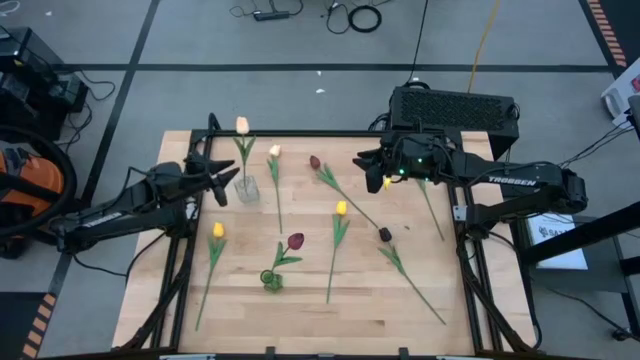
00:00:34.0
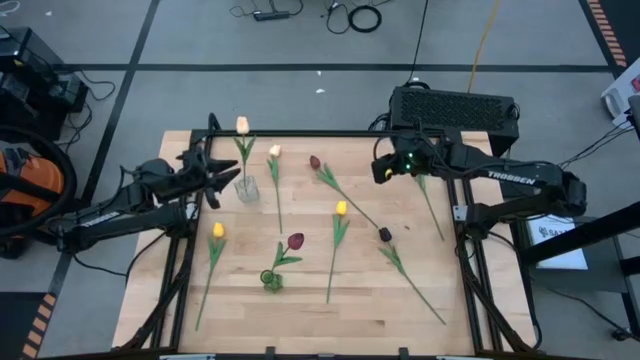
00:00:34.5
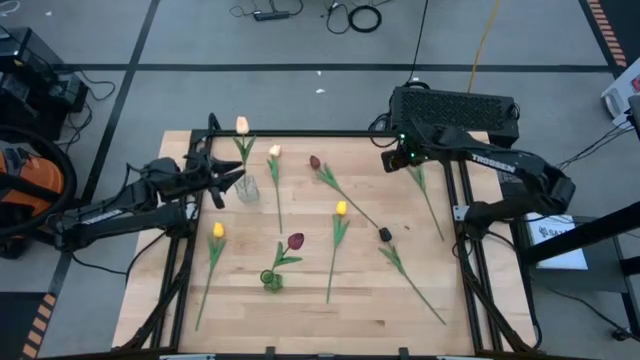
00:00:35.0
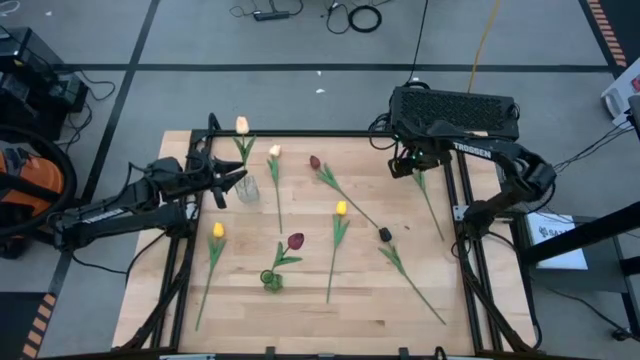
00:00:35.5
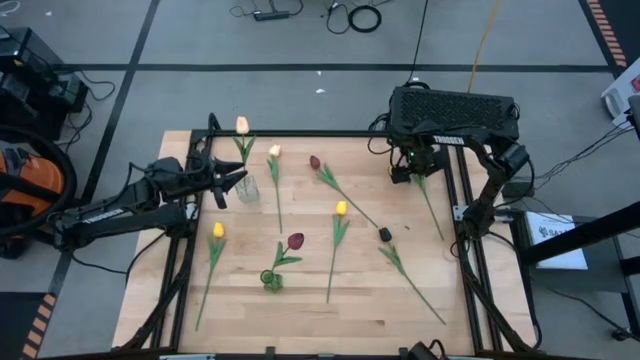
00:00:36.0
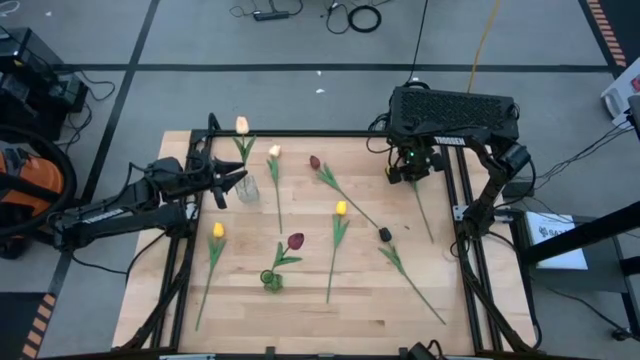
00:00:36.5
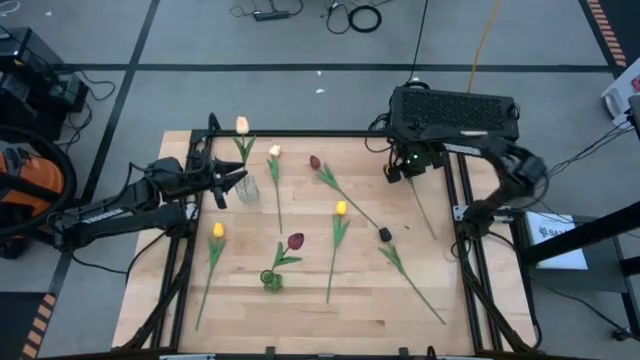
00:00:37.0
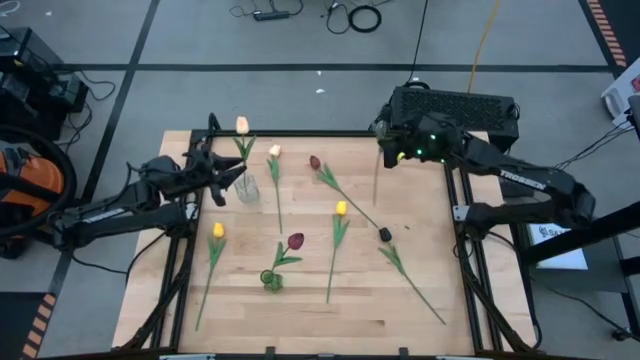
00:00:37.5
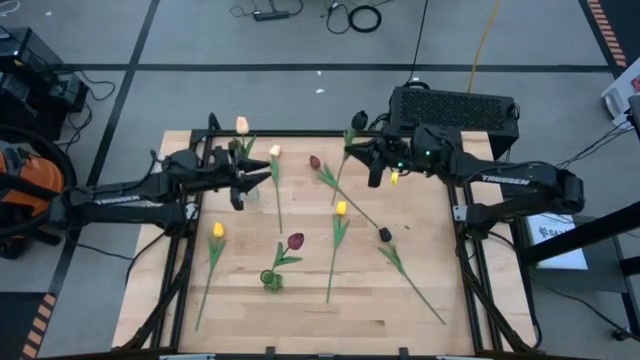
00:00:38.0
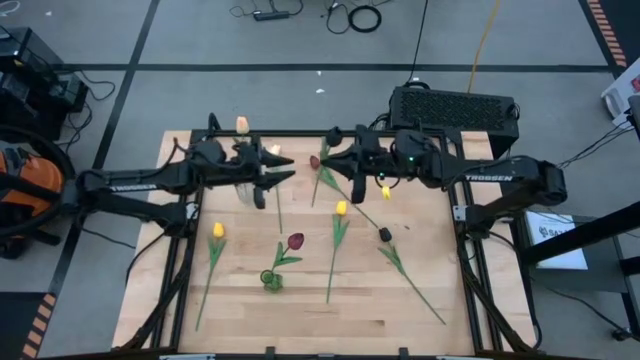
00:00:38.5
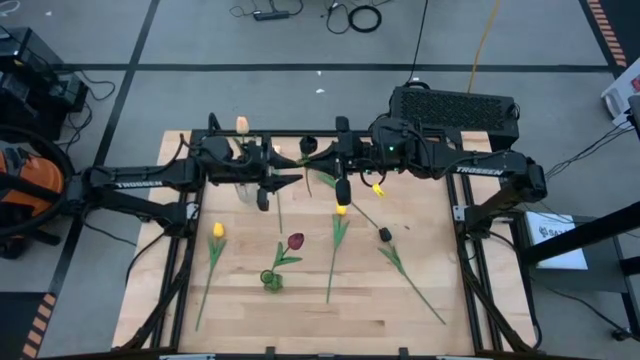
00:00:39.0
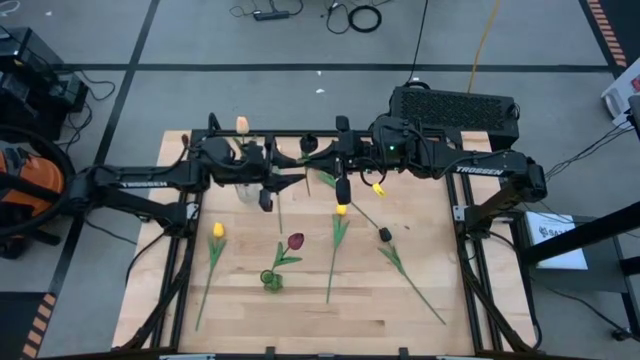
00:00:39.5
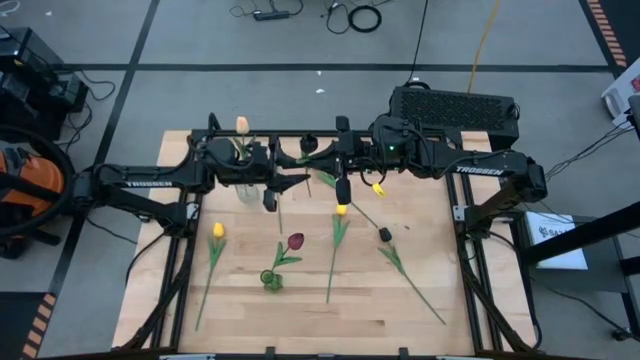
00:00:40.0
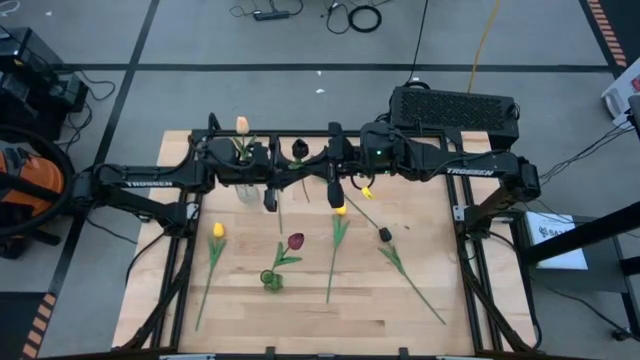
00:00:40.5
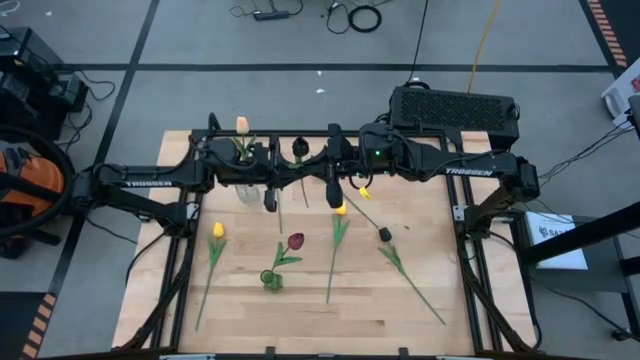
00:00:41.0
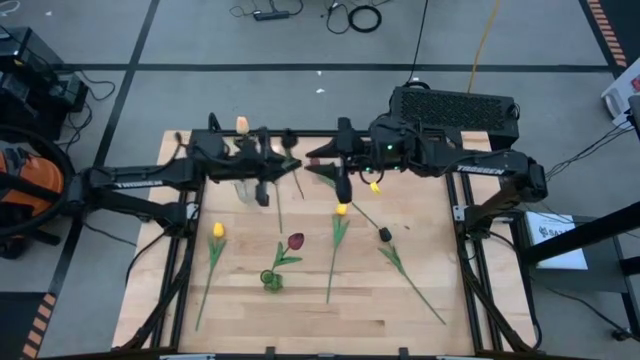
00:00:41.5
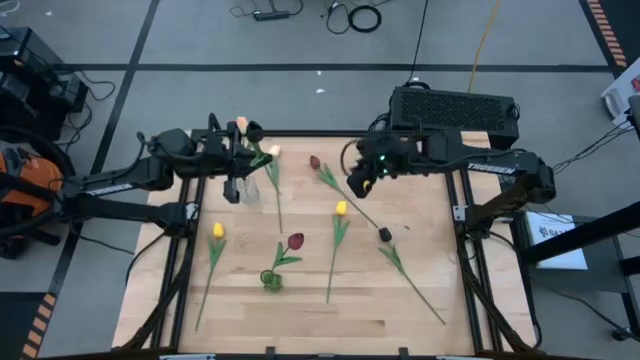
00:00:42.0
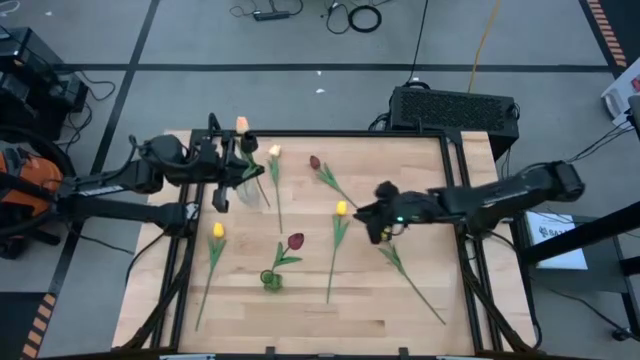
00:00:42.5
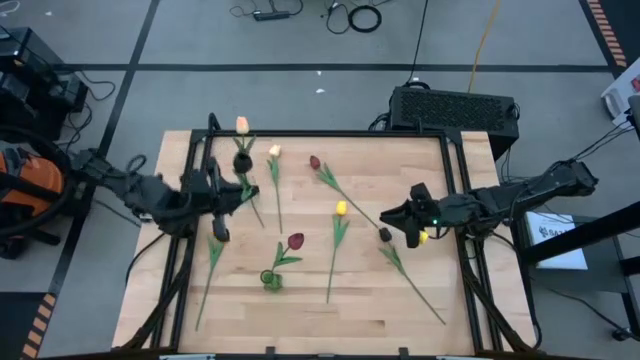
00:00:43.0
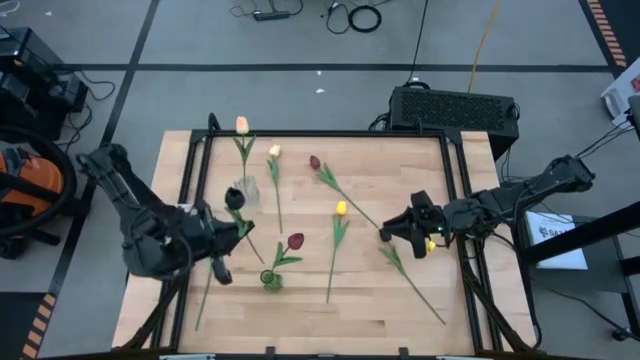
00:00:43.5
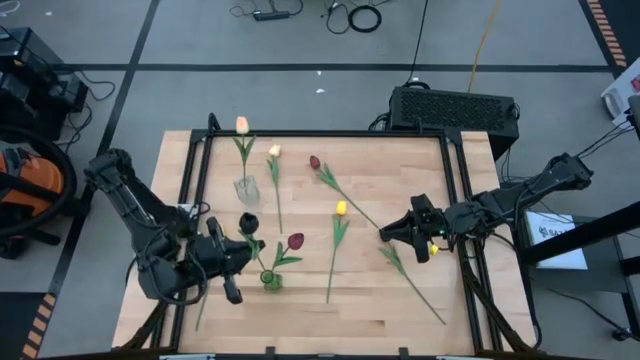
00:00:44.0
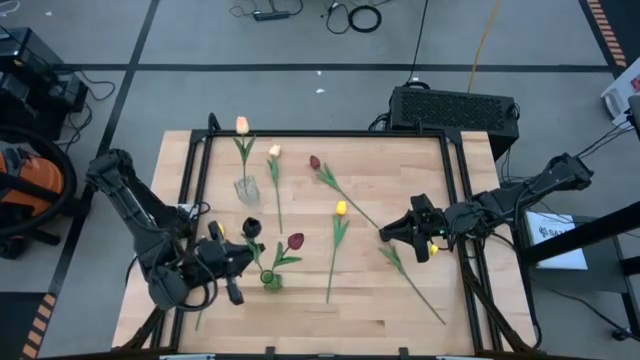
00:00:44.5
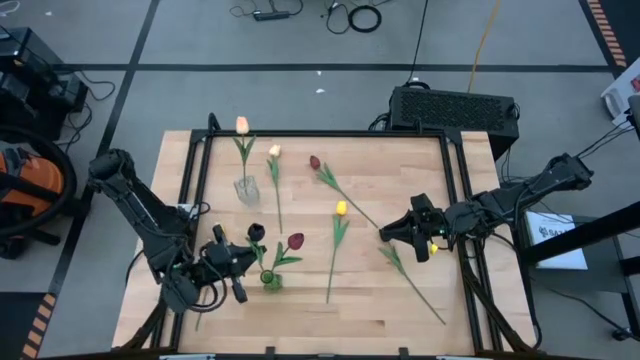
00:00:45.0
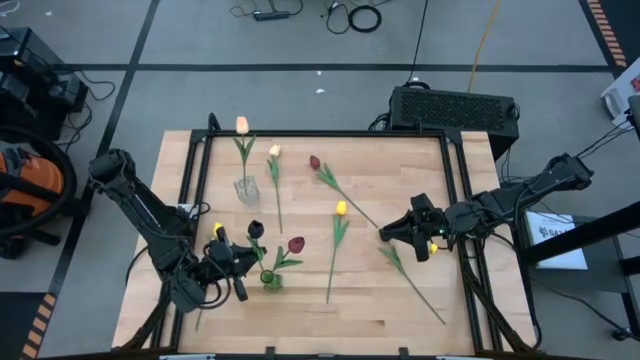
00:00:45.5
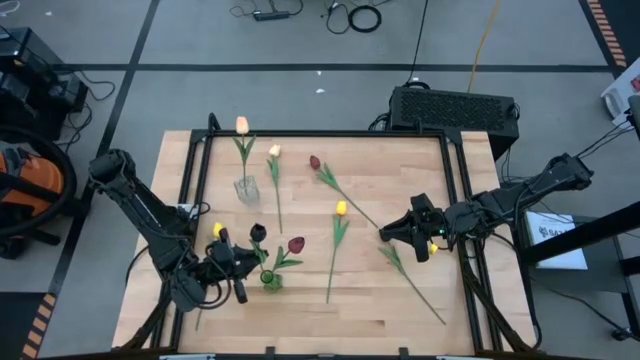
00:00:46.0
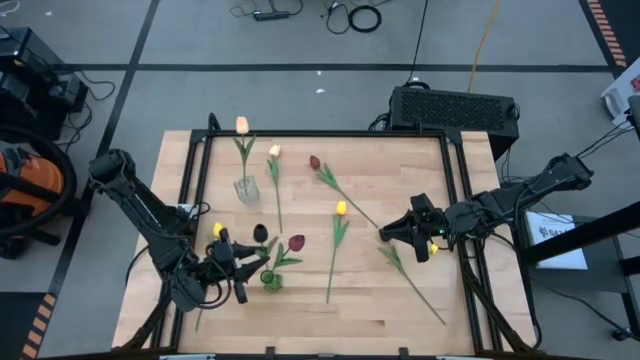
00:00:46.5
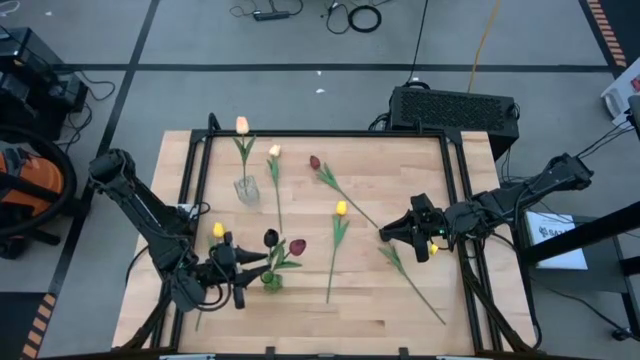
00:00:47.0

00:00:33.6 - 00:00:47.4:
Task: Sort flowers into vase by color
Put the top black tulip into the green vase

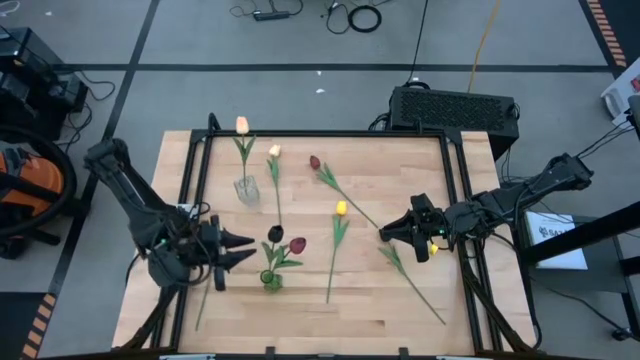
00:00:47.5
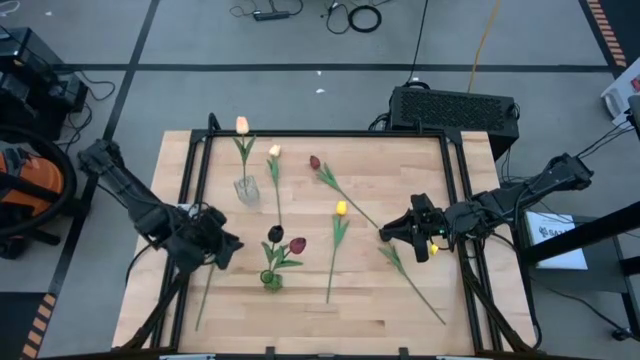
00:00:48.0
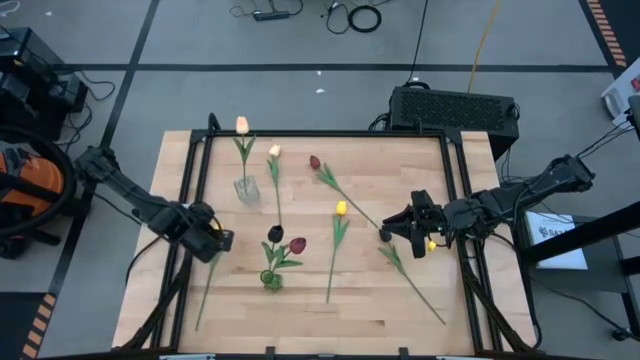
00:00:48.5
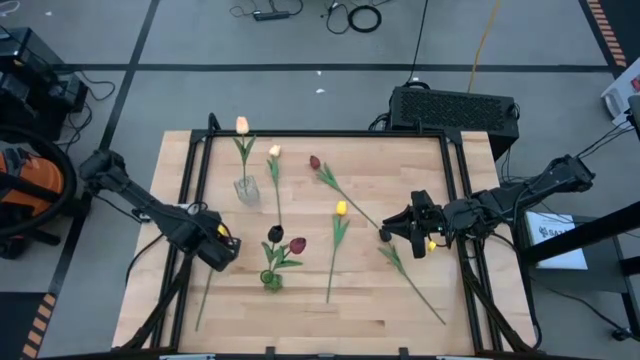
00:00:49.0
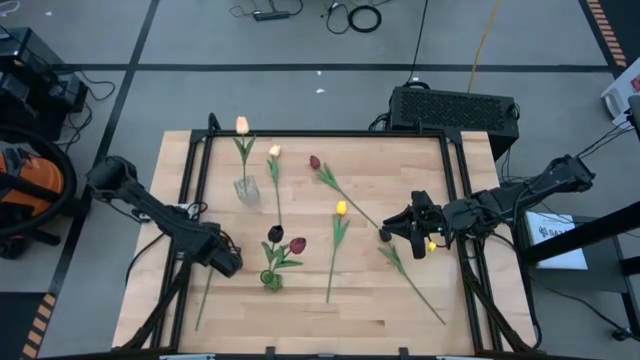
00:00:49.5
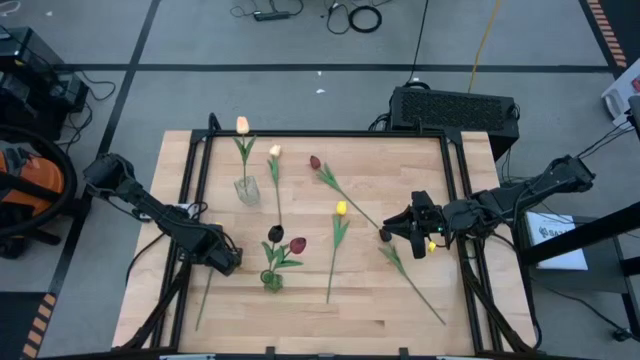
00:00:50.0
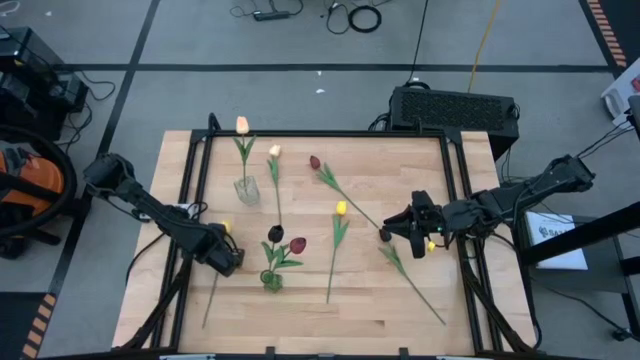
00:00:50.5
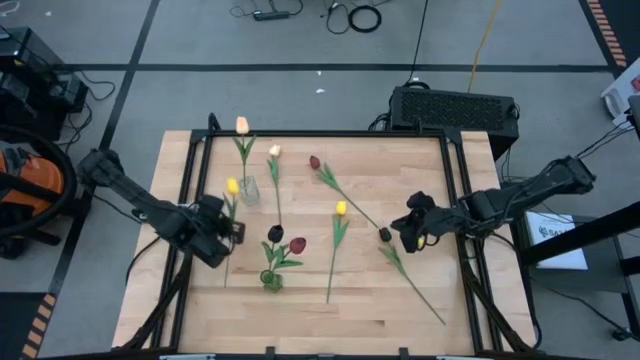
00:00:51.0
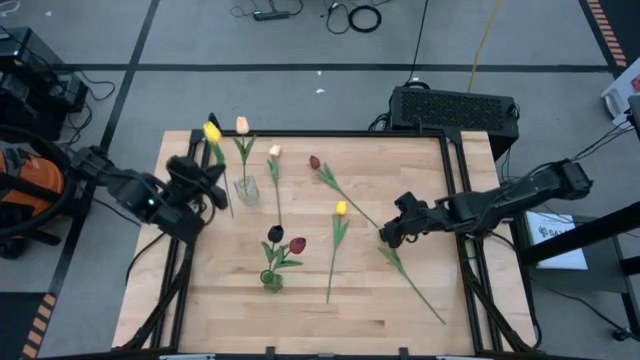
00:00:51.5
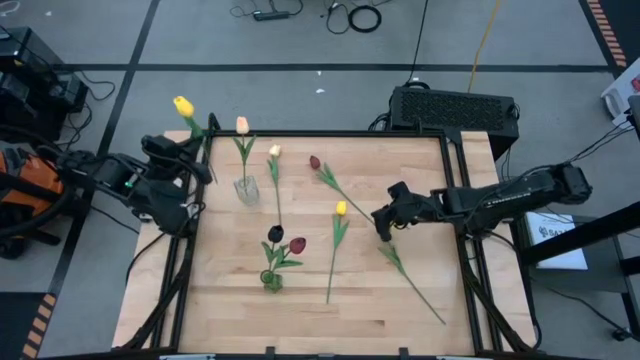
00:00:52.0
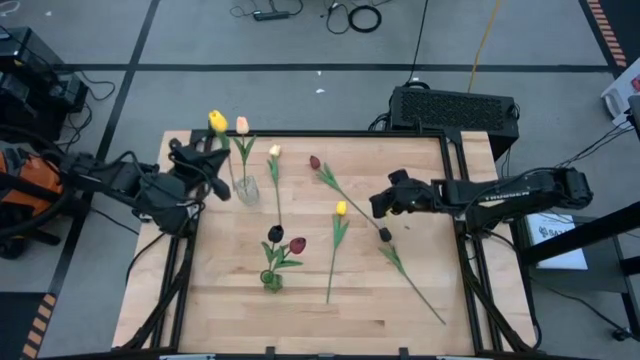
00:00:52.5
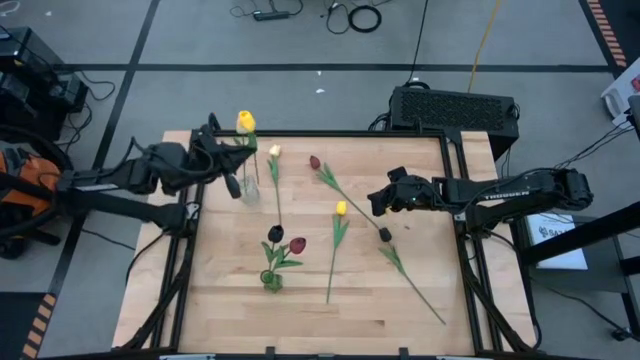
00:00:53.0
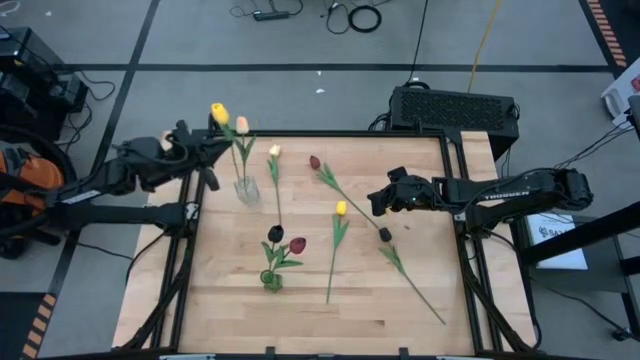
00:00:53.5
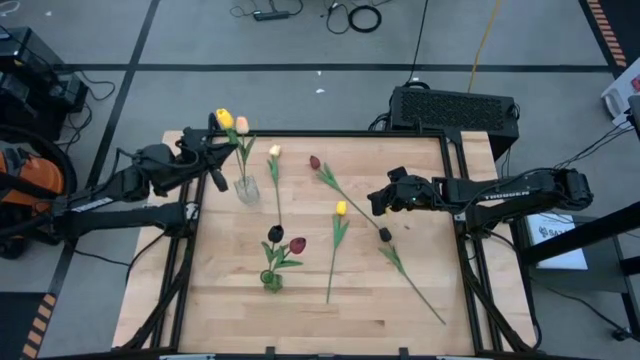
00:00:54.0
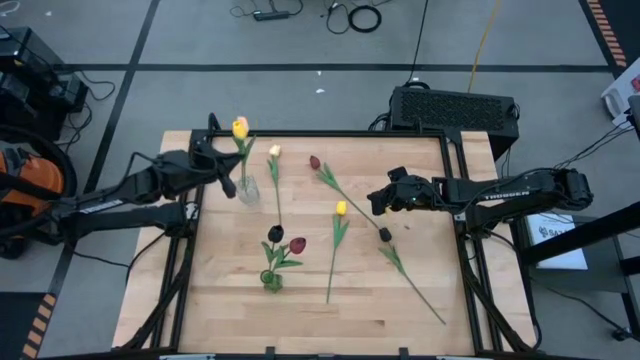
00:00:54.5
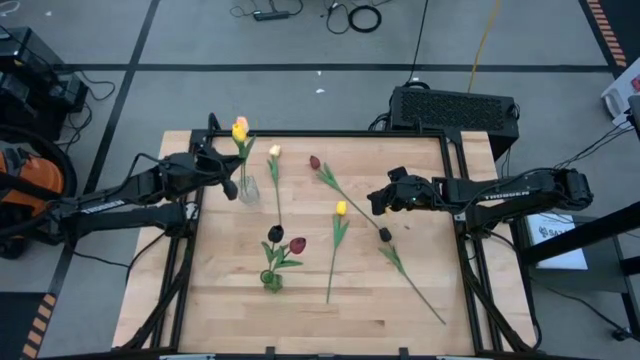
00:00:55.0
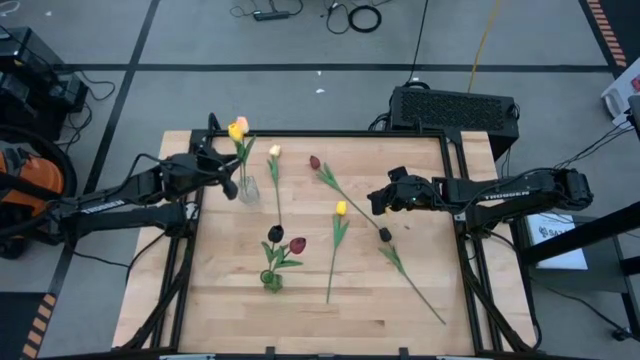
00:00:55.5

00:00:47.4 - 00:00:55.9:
Put the left yellow tulip into the transparent vase
